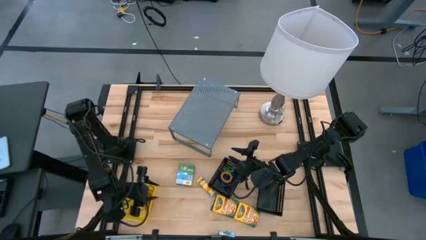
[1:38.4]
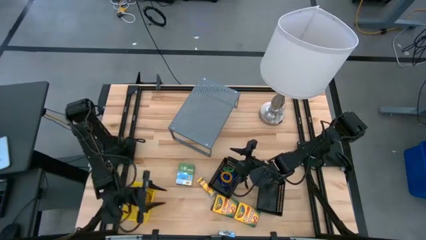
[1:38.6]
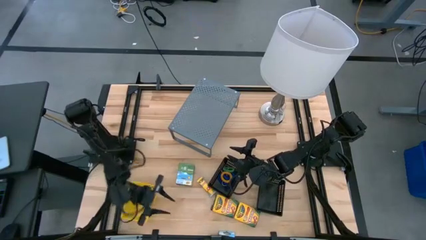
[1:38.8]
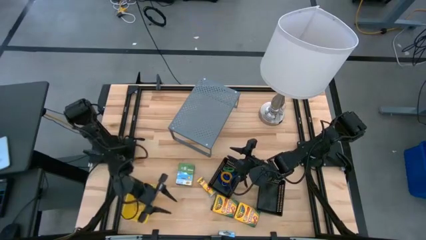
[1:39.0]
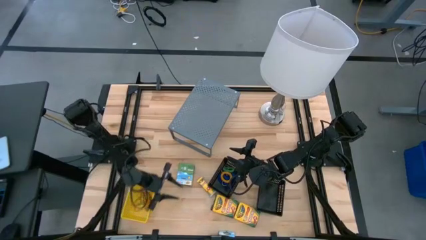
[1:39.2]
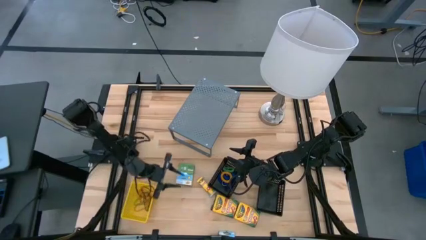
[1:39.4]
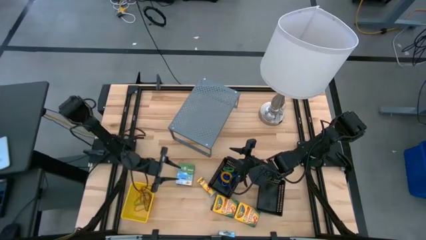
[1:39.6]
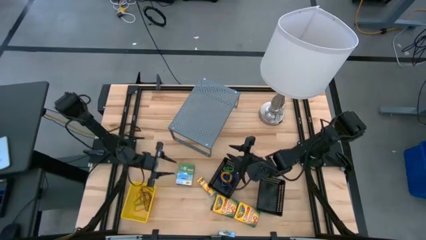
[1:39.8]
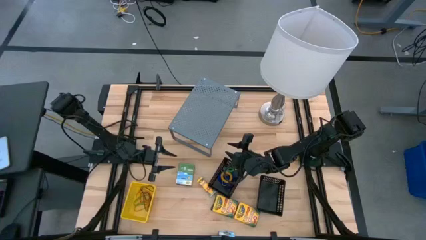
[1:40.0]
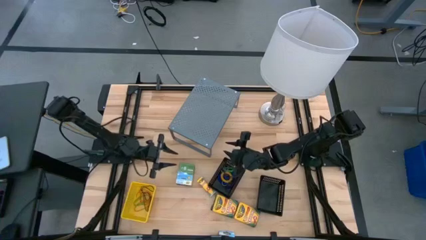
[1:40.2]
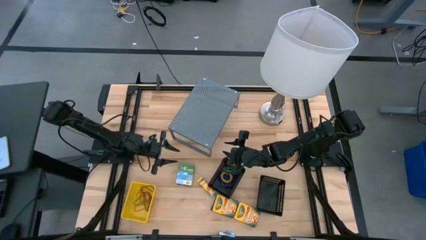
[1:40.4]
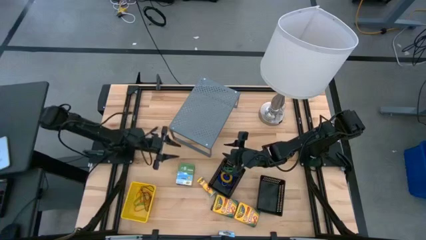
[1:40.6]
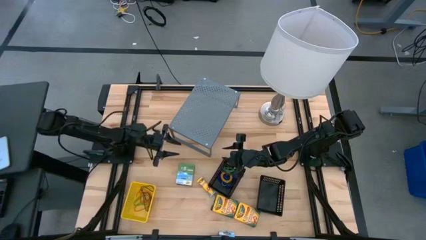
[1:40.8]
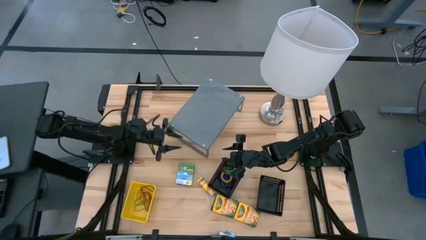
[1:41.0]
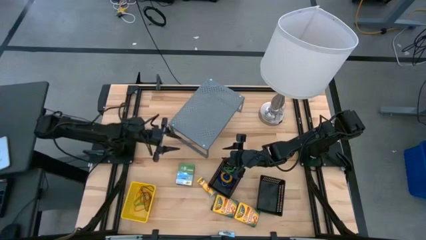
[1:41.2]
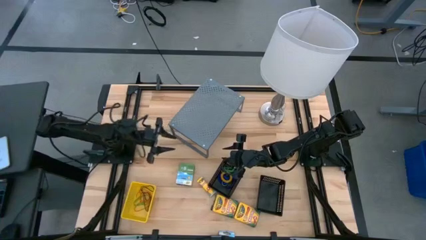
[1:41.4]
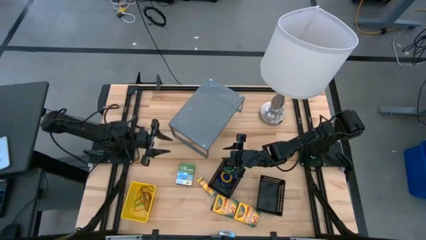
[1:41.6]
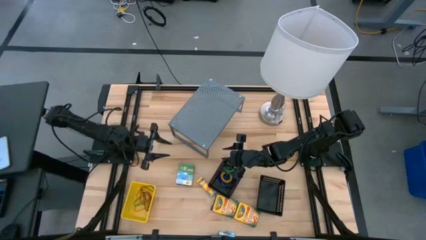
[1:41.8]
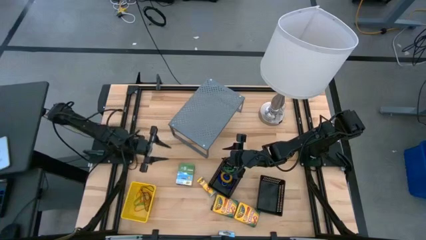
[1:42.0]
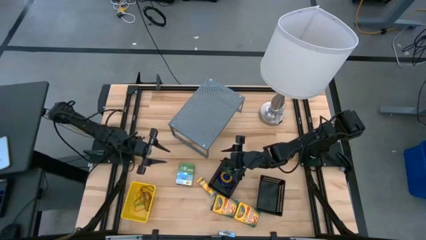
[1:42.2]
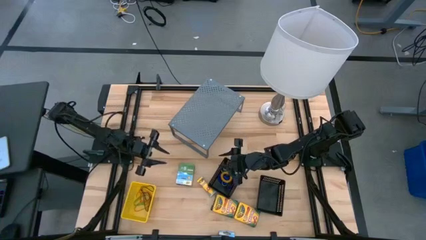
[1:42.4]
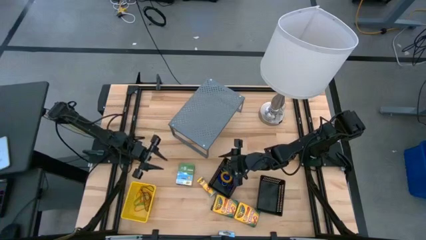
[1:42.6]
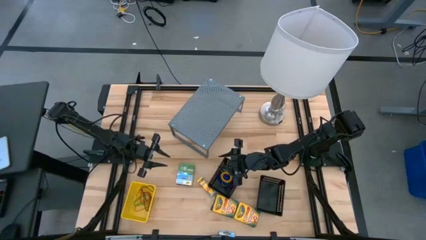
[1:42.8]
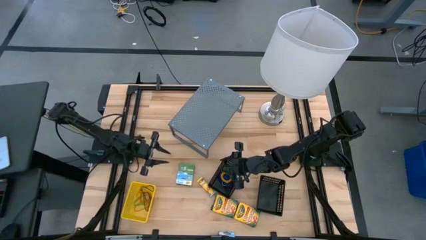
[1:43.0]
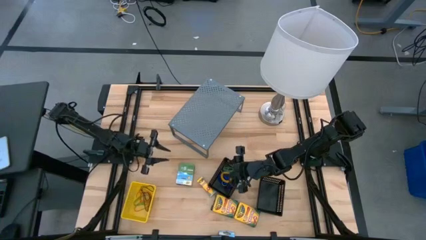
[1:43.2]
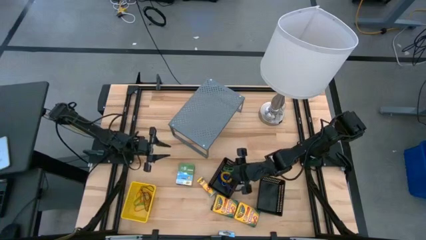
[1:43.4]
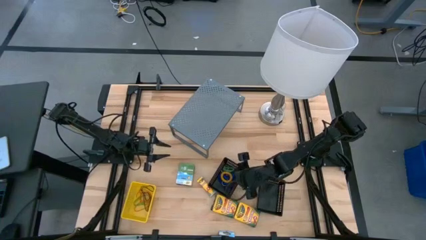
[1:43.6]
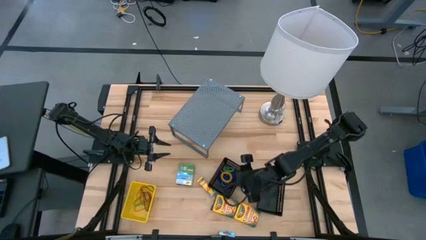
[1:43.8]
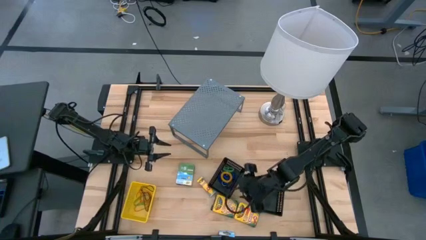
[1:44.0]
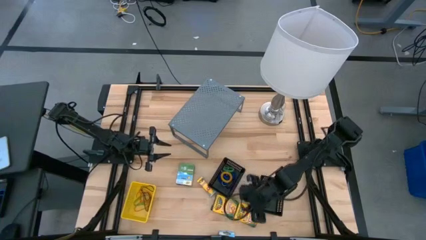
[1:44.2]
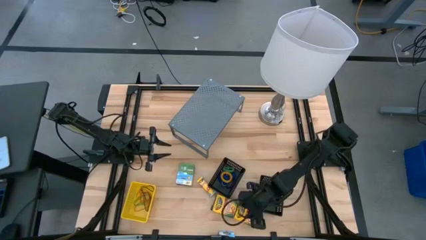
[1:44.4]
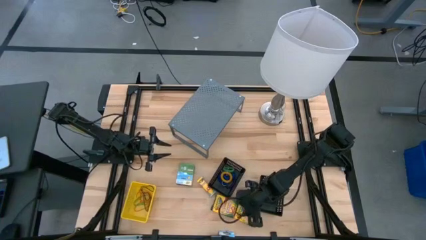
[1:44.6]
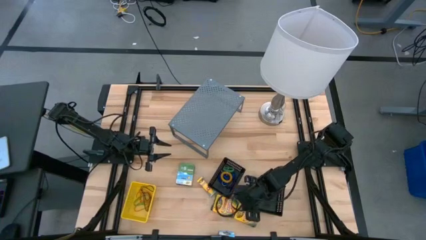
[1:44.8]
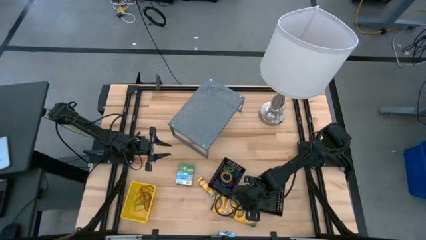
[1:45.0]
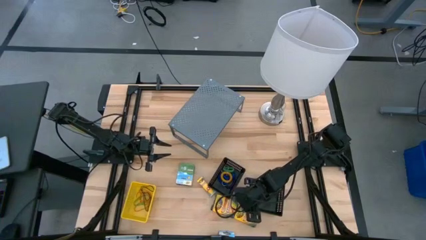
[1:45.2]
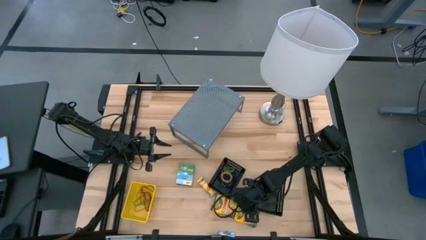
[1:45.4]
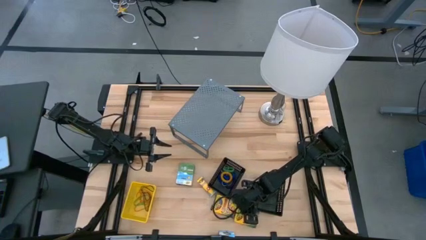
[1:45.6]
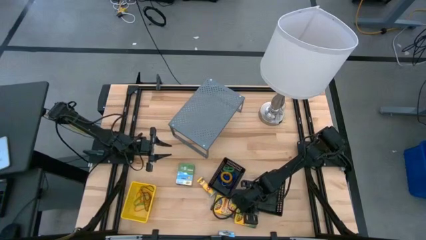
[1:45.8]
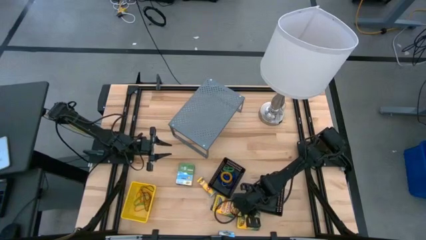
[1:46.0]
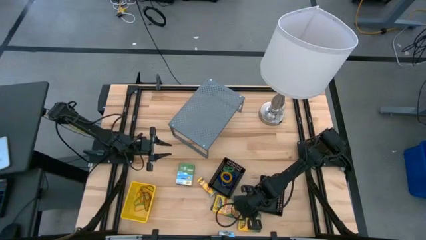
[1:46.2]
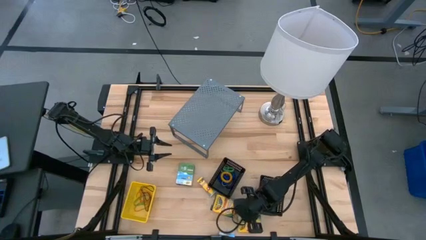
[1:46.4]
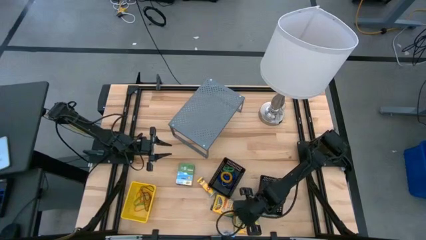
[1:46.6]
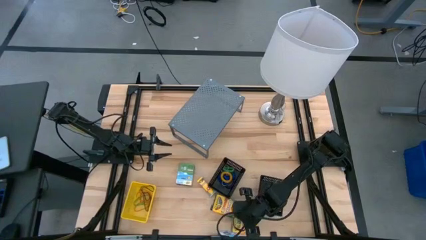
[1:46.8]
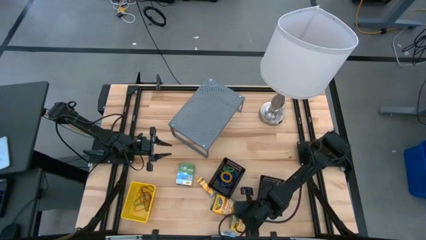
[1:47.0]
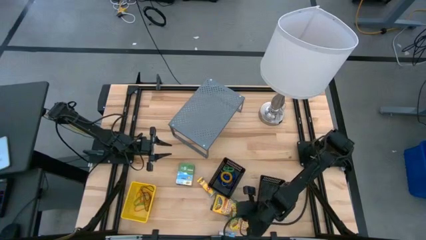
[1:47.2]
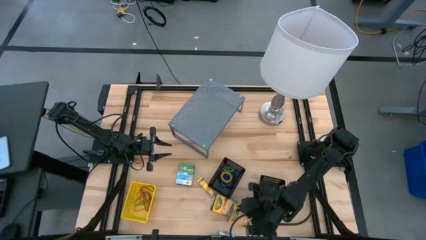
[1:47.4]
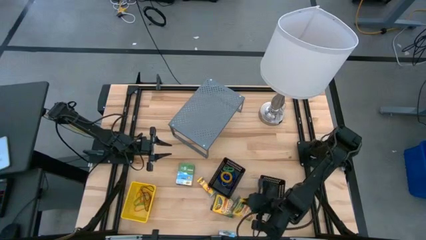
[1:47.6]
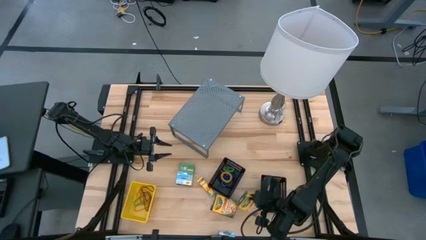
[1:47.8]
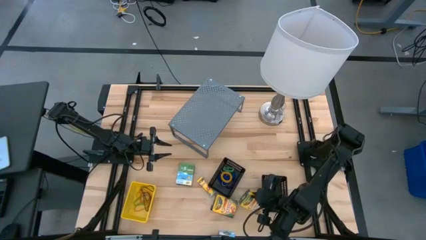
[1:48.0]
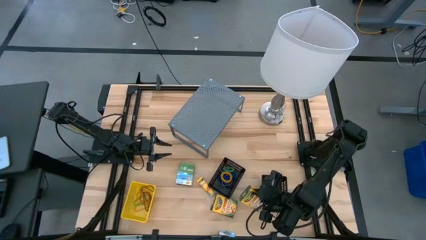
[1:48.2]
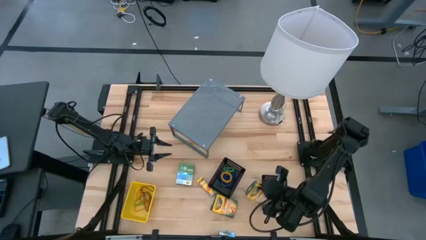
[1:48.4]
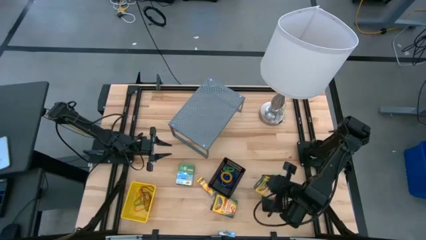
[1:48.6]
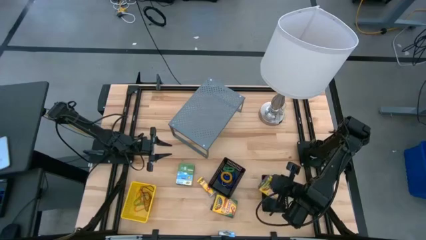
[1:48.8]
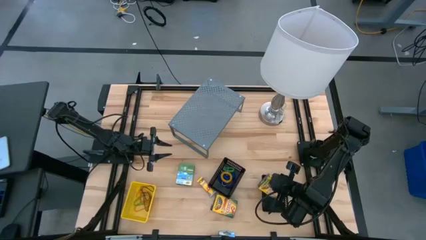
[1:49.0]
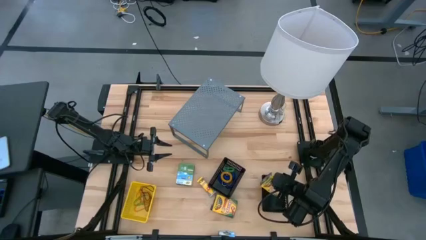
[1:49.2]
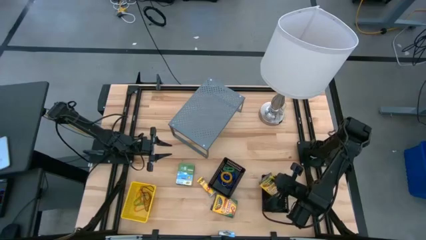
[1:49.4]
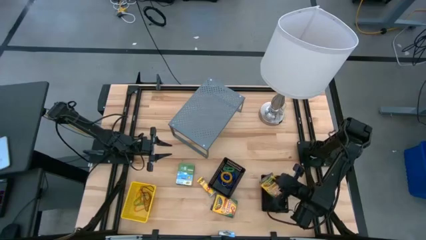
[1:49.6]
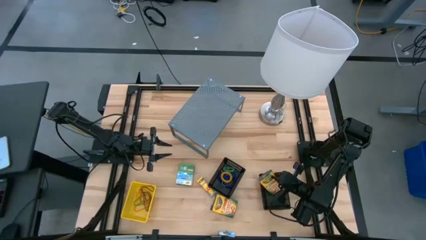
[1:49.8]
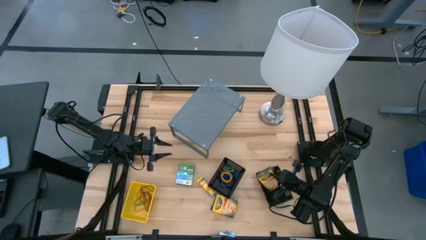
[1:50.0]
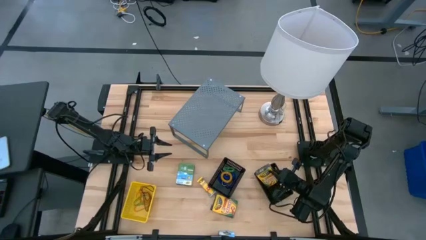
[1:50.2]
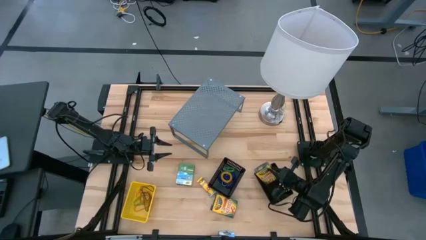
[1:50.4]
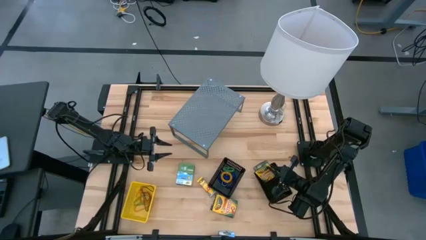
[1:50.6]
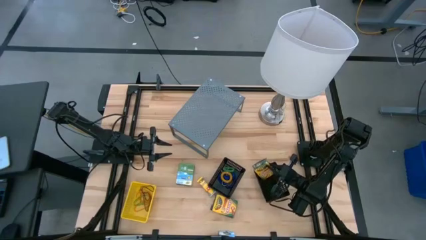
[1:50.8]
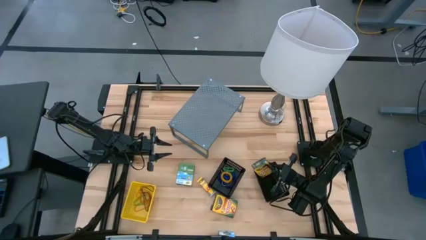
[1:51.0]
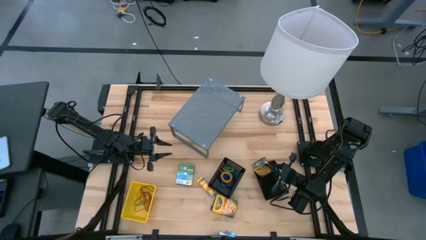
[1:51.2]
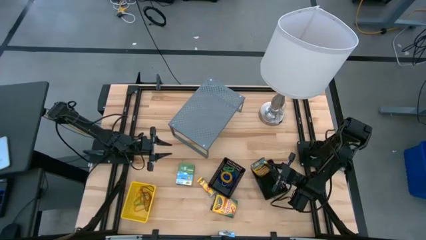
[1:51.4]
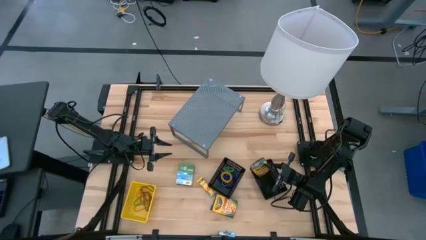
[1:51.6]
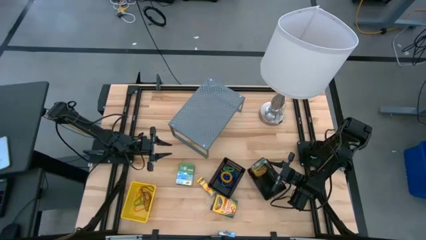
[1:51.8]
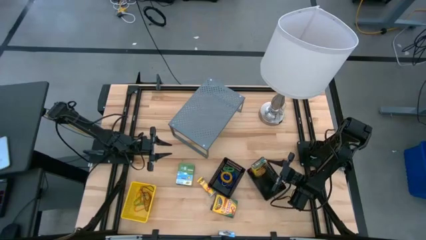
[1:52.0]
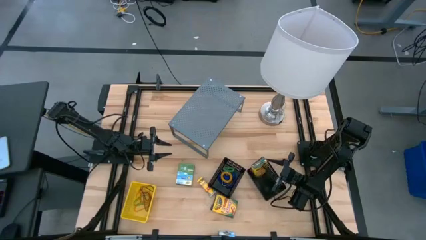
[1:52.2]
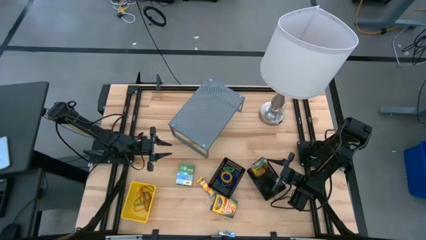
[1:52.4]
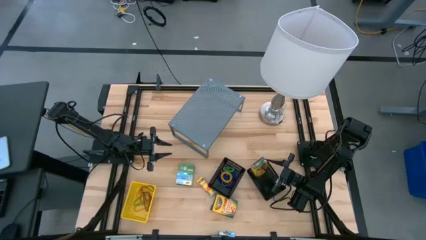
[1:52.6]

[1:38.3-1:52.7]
Task: Pick & Place Office Desk Supplies
Put the box of crayons into right black bin
